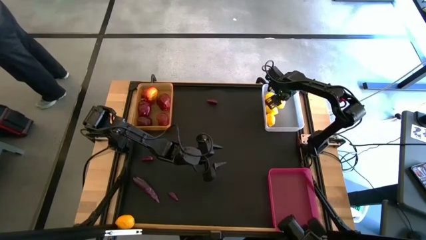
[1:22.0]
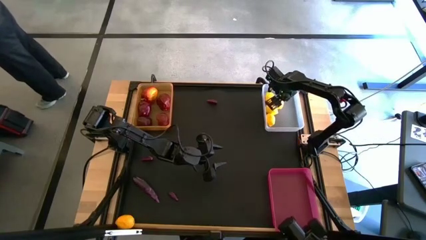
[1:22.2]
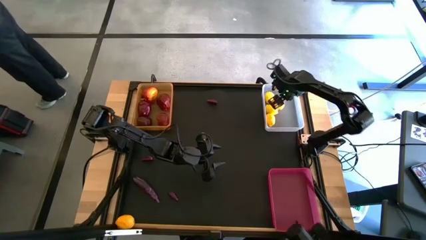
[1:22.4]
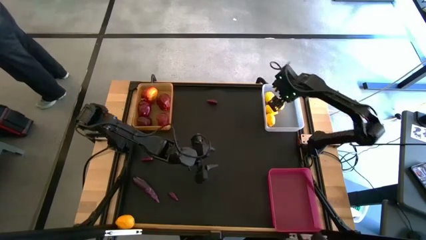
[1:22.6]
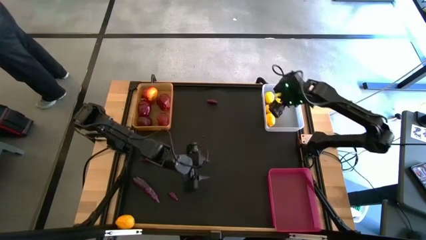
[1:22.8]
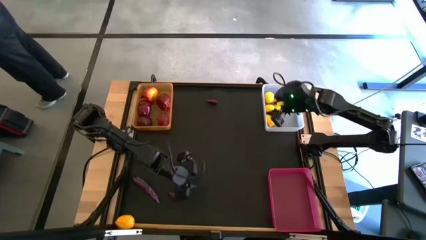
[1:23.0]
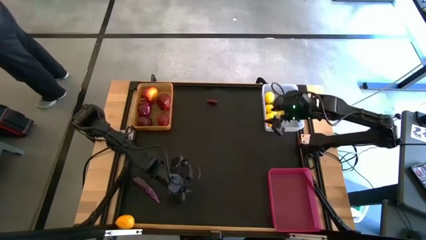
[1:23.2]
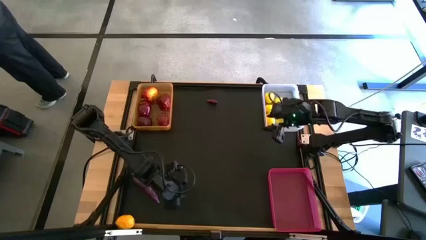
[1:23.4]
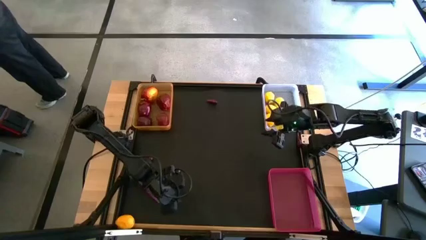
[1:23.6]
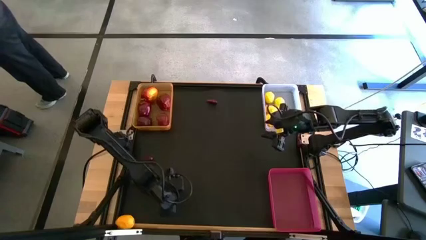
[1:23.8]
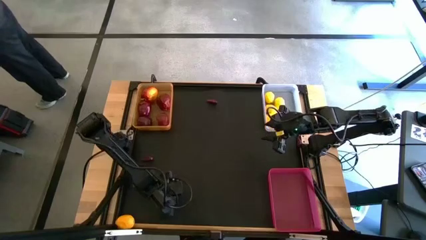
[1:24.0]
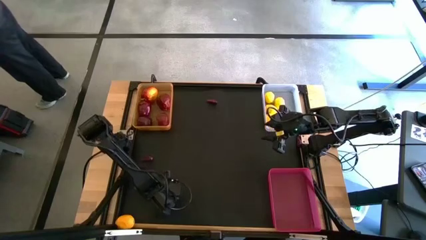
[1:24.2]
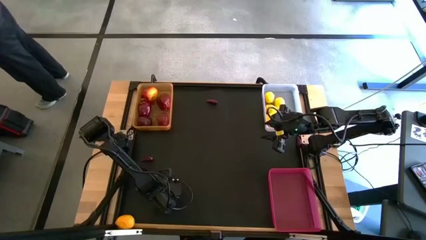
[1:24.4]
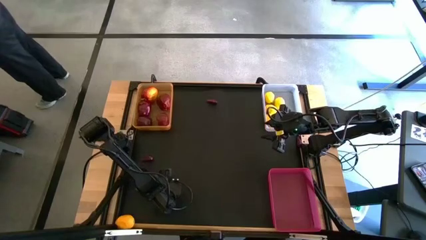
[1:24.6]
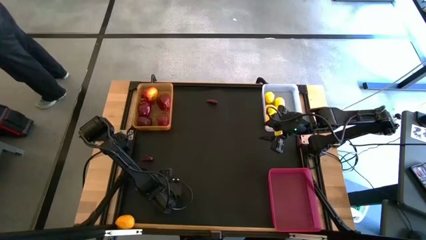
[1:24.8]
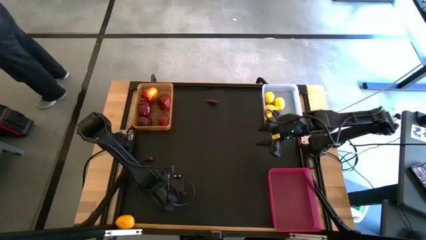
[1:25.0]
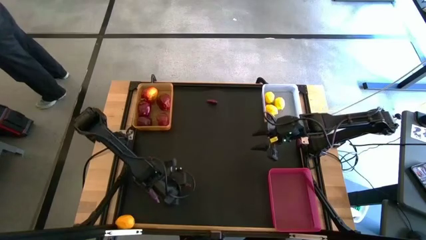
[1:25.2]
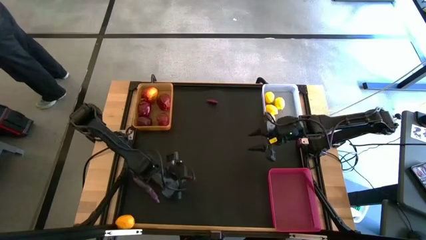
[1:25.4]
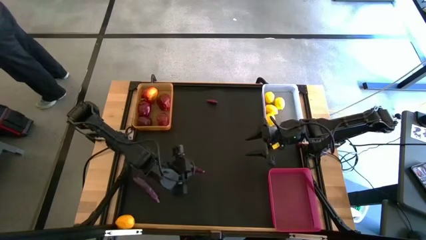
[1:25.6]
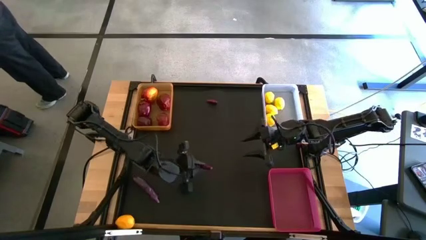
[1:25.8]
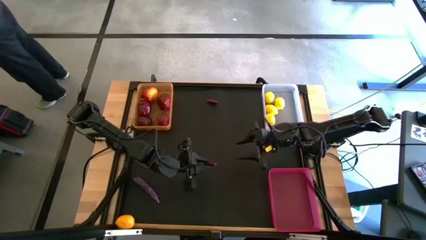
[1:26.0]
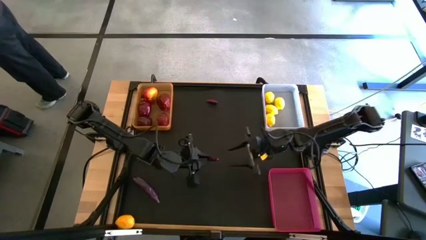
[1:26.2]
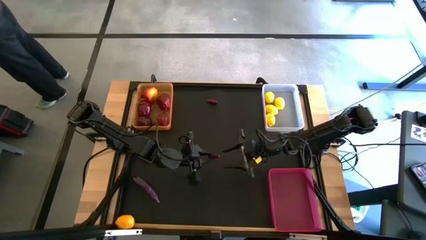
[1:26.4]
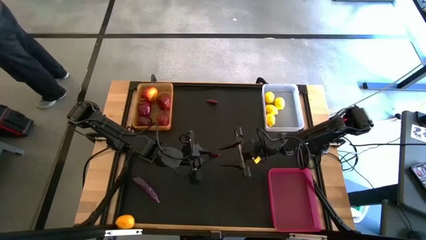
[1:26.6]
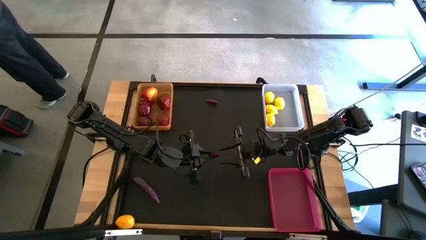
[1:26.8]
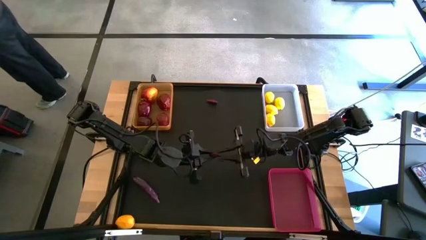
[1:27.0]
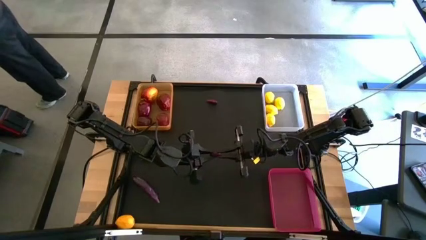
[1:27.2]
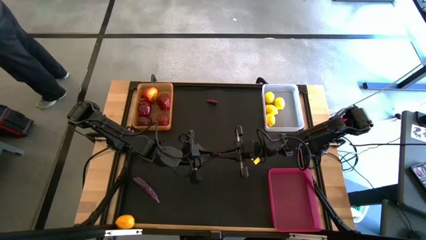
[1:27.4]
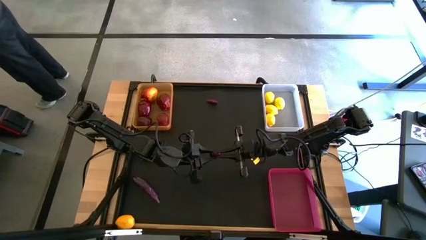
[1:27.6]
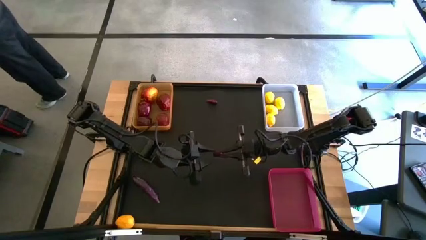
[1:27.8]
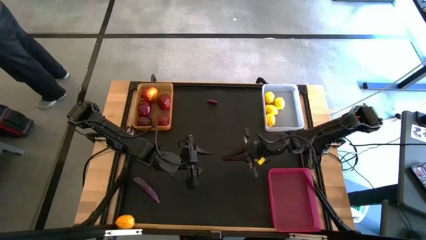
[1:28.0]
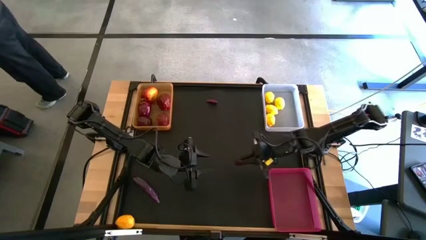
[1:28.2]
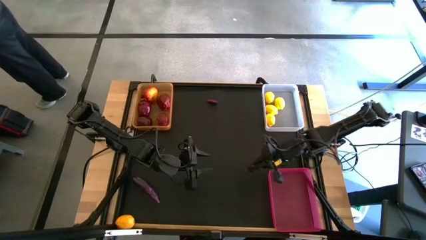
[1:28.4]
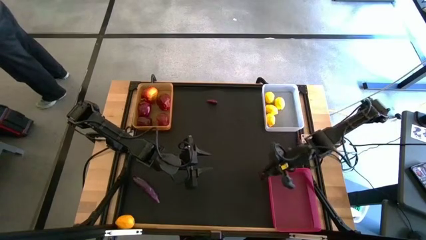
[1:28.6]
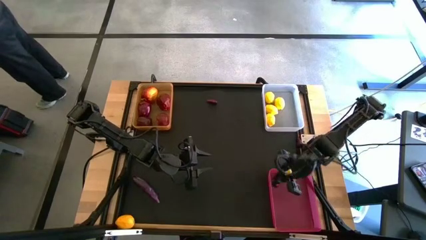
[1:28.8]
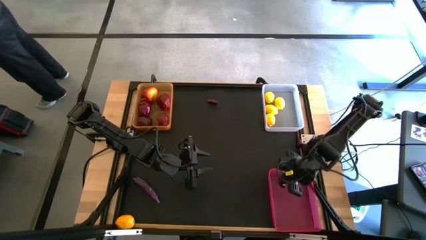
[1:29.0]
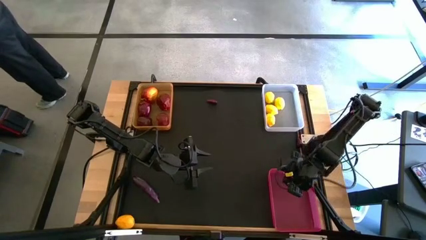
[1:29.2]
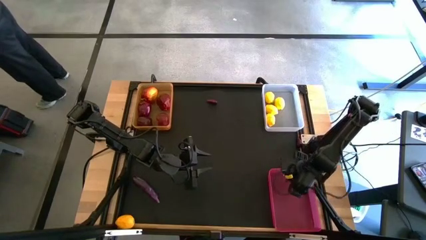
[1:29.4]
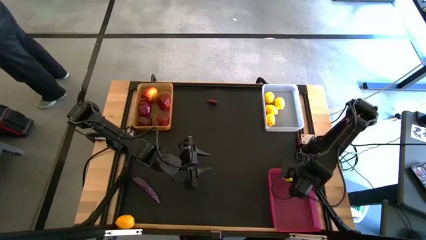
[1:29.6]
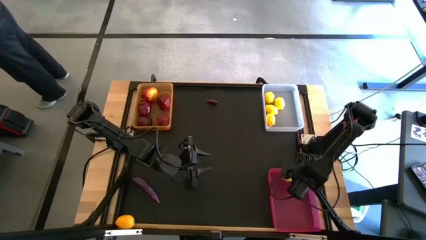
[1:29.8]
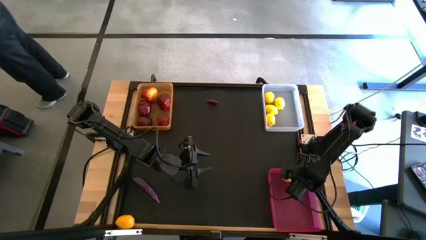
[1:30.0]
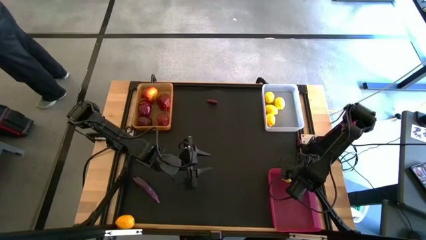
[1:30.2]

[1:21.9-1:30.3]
Task: Sort produce into baskets
Put the eggplant into the red bin

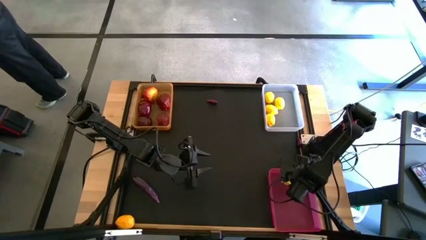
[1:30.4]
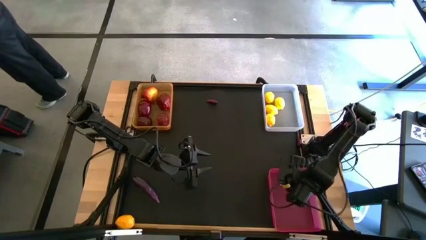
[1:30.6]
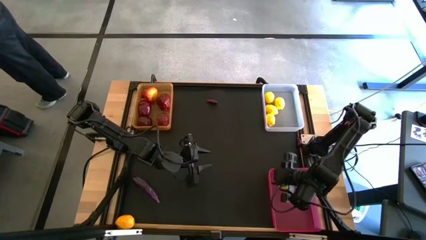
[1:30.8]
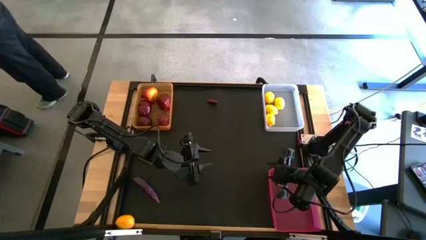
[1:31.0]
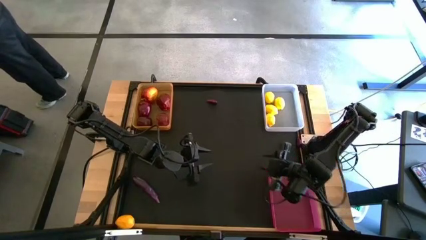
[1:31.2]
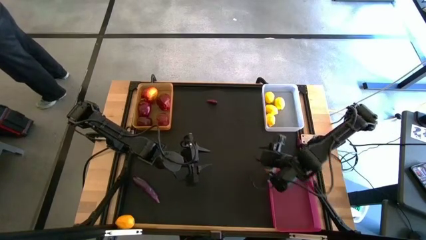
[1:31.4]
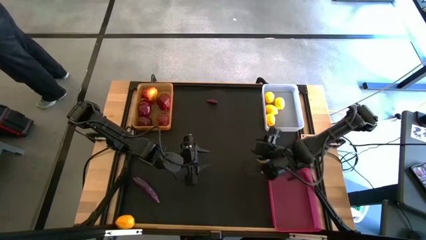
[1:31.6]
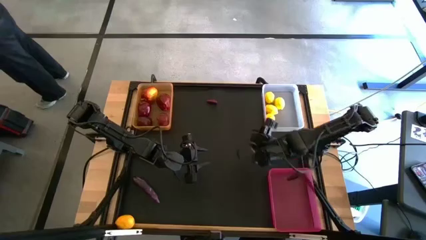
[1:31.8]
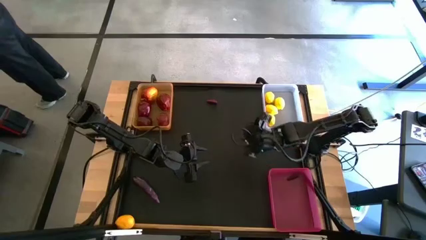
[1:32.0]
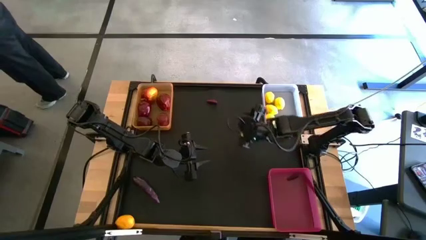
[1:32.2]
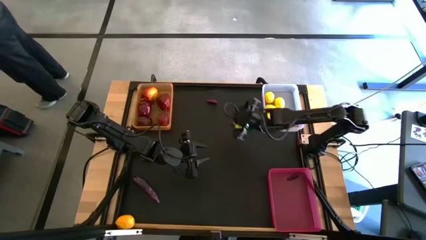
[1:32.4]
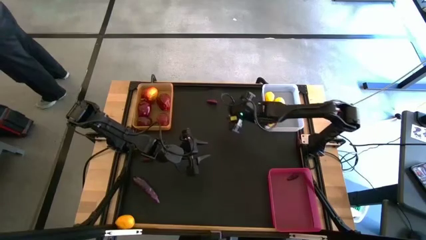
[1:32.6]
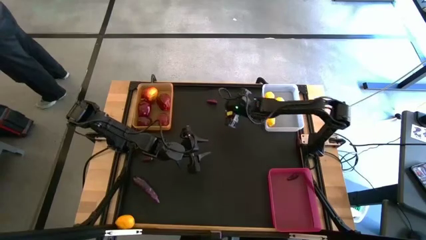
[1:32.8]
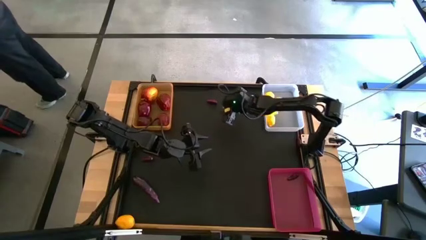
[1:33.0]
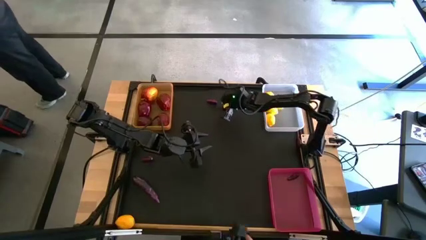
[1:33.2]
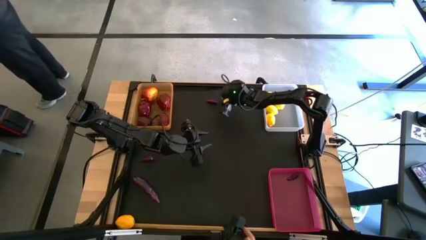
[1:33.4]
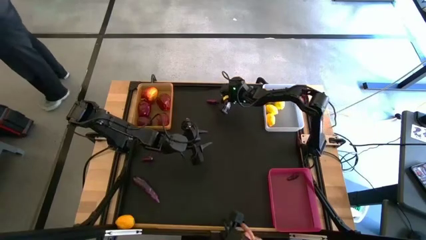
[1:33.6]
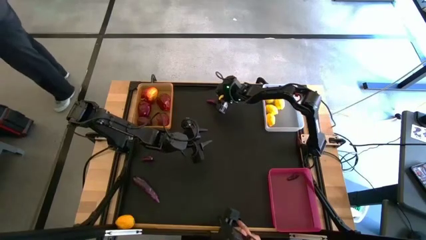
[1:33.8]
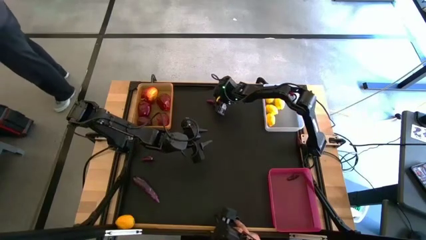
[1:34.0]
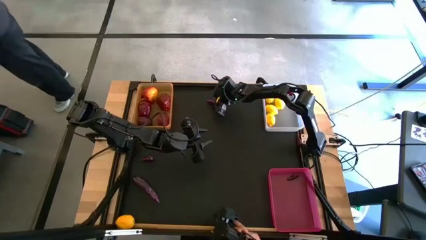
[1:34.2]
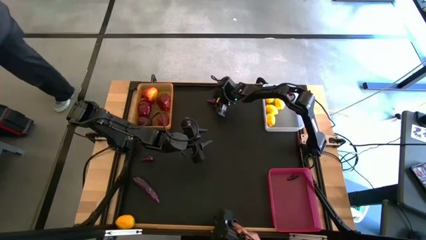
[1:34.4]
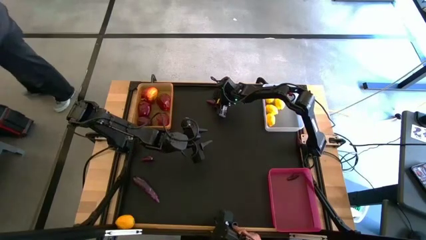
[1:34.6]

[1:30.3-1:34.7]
Put the eggplant into the red bin

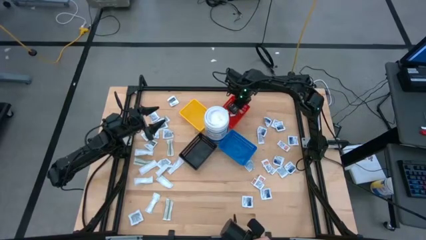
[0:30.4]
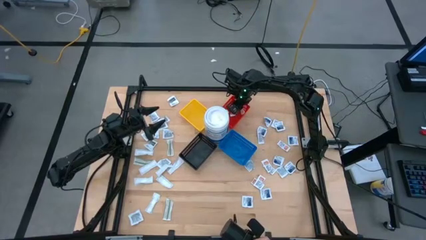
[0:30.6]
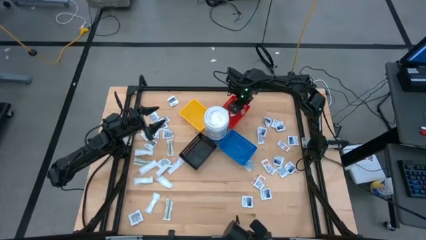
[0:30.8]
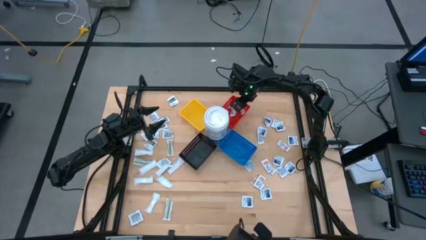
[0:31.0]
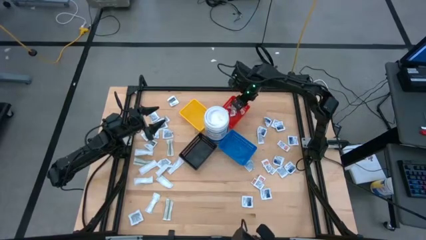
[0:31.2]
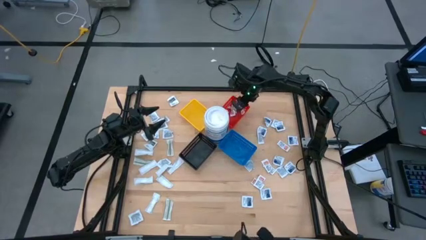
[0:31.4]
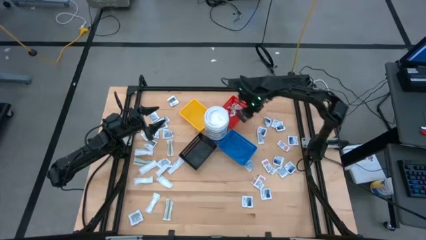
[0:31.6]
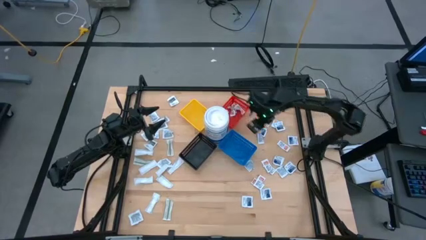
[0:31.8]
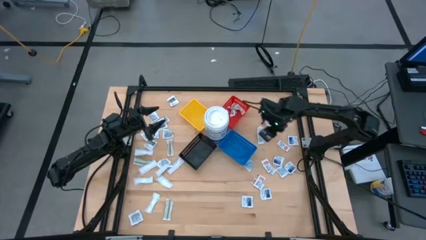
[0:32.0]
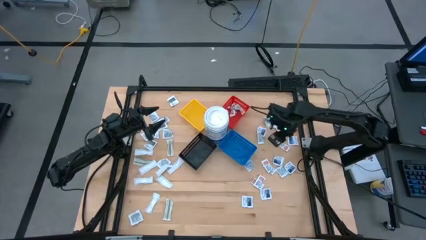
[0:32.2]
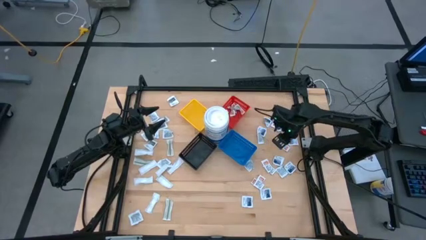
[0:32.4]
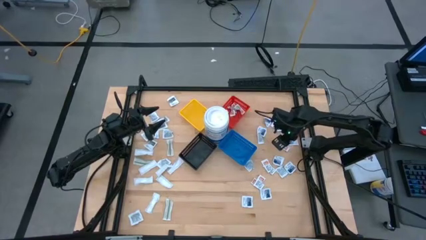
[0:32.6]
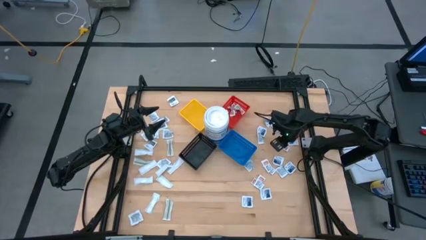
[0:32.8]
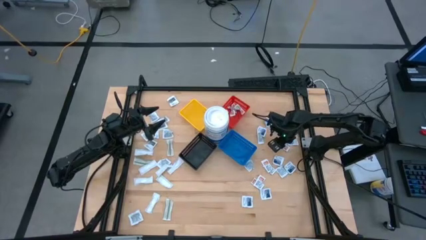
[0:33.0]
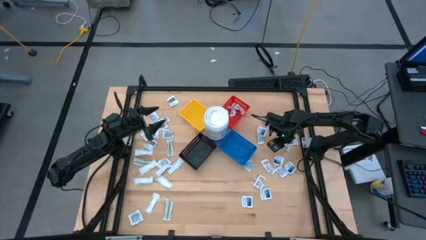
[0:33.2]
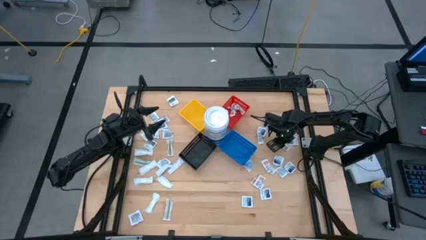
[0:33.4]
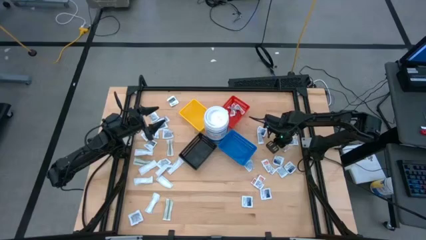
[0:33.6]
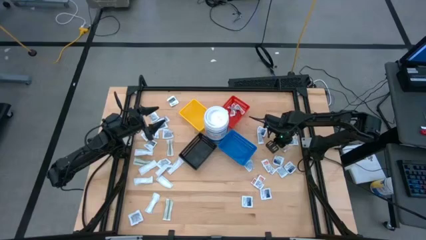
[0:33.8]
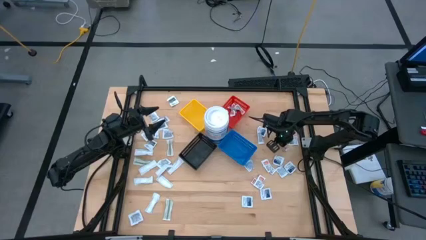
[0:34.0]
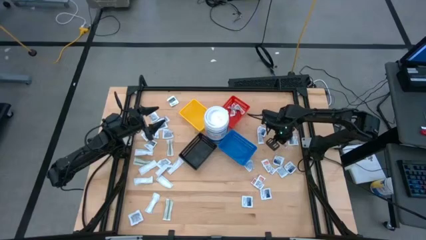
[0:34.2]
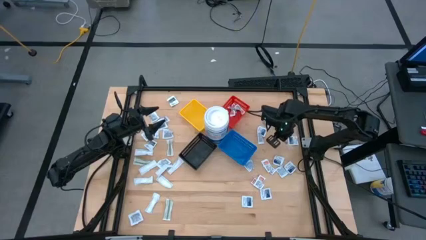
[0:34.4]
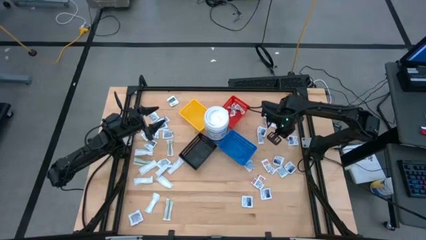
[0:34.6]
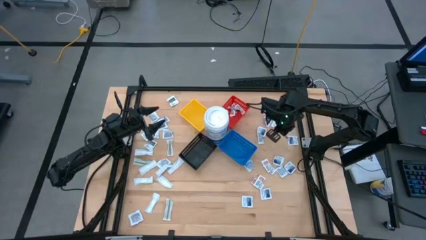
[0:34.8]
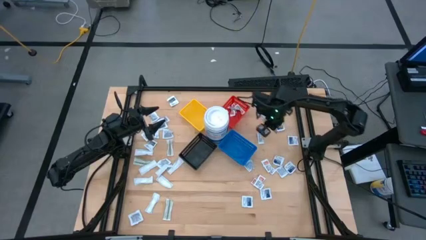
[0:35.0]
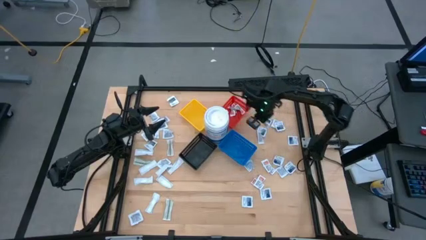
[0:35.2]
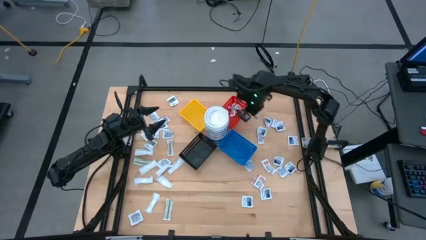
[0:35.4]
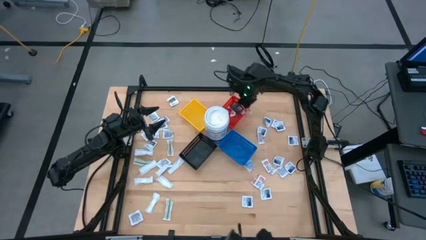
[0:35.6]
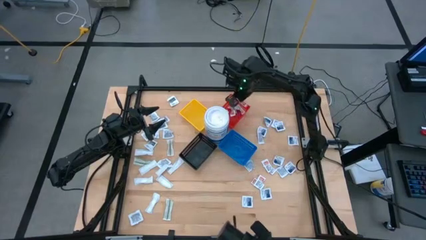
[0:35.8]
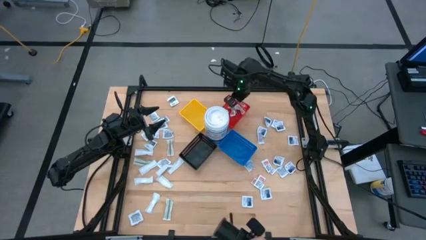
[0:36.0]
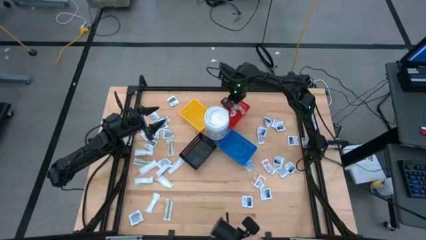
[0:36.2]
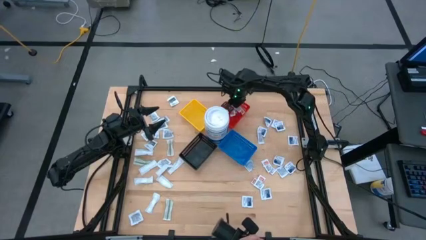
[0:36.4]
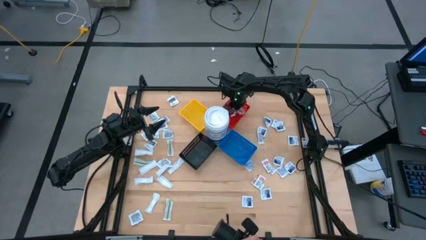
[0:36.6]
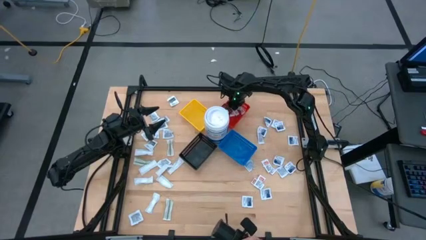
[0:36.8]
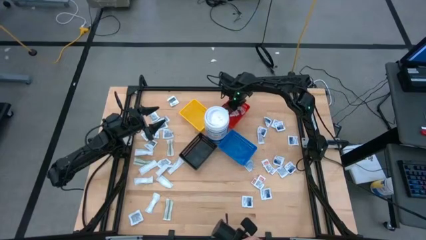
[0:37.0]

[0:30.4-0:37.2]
Task: Pick & Place First Aid Supplies
Put the ointment pack into the red bin
